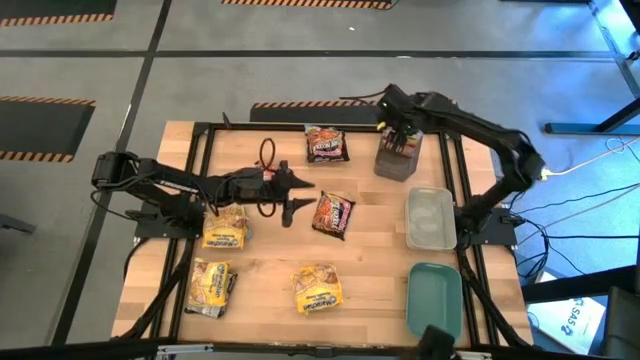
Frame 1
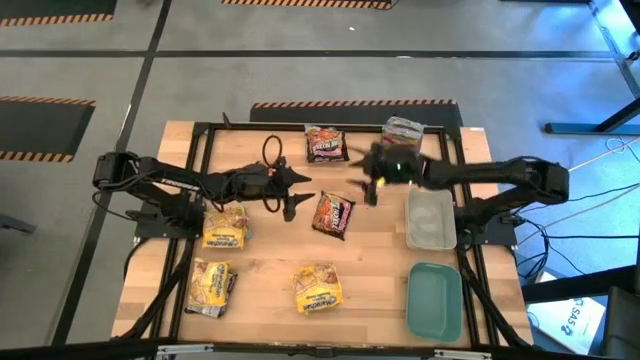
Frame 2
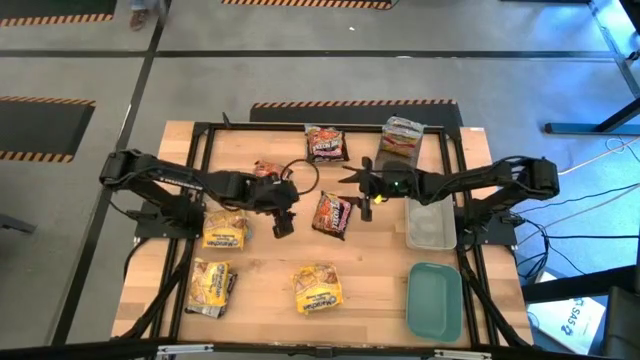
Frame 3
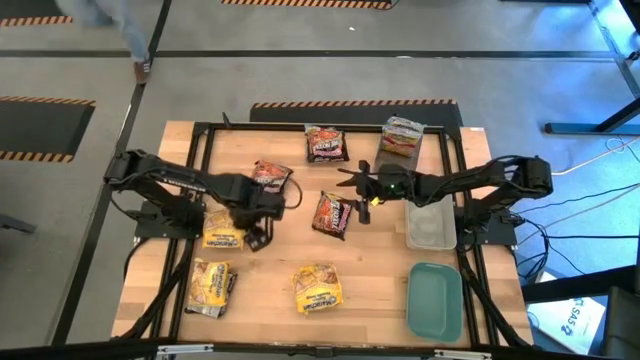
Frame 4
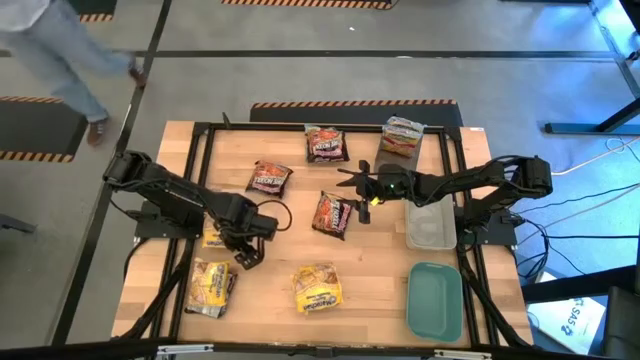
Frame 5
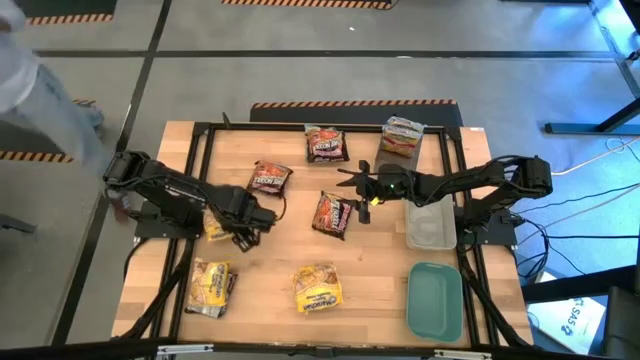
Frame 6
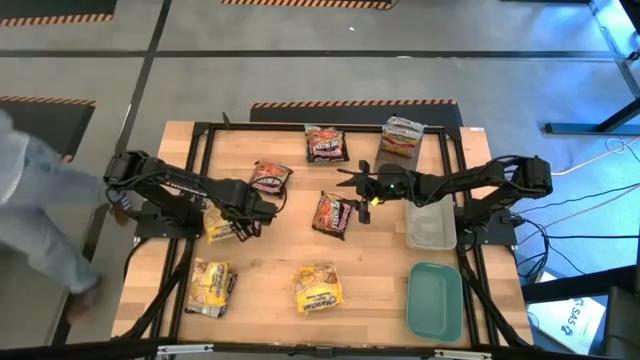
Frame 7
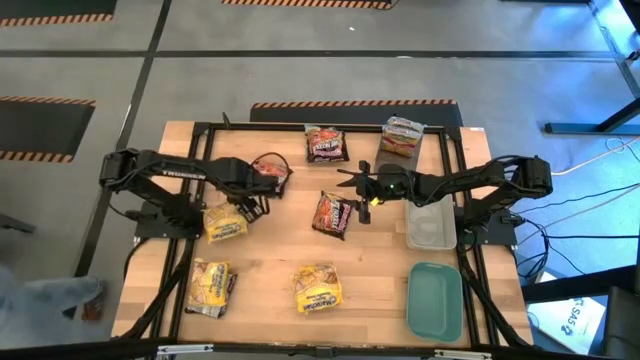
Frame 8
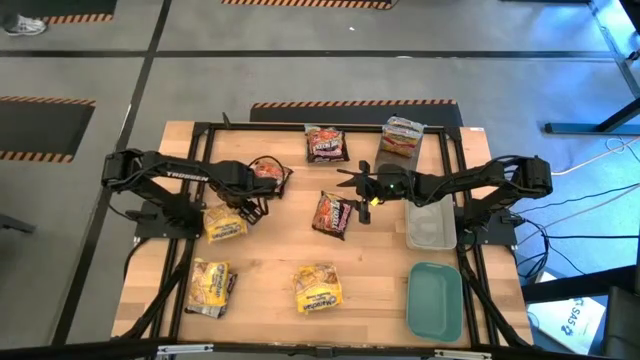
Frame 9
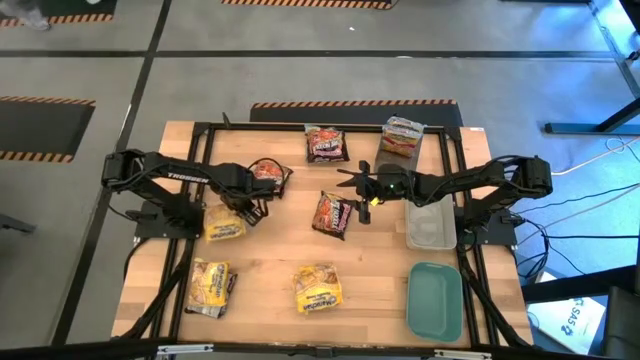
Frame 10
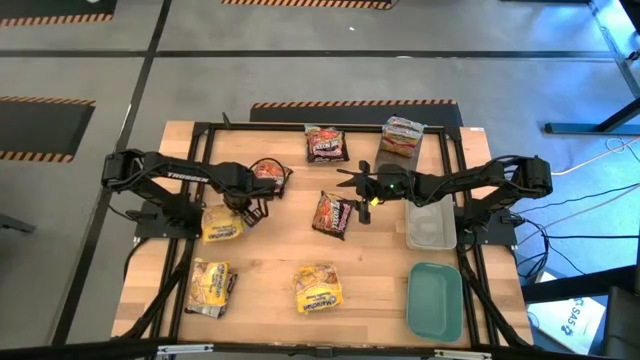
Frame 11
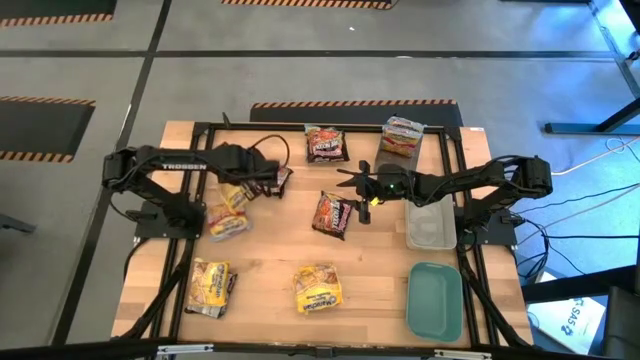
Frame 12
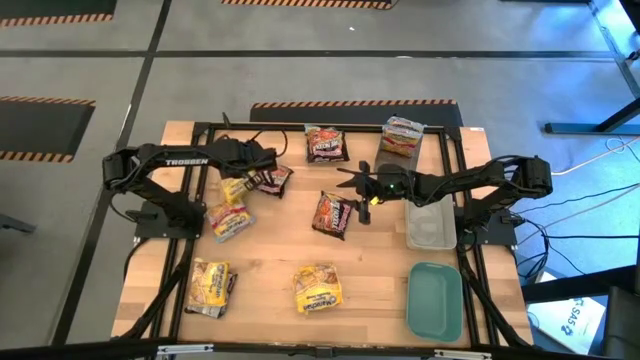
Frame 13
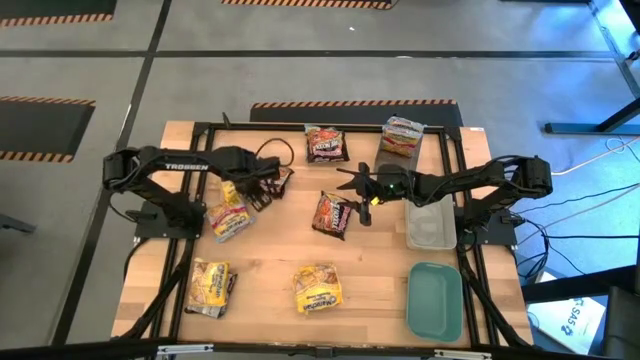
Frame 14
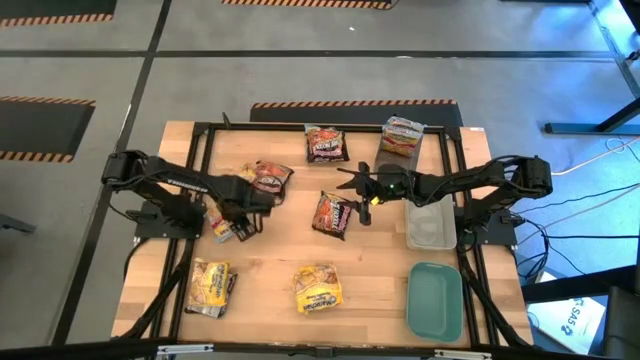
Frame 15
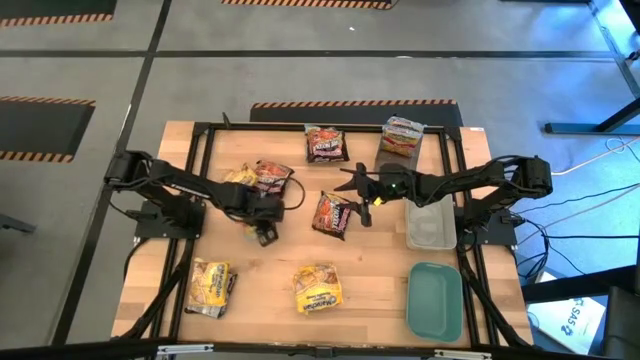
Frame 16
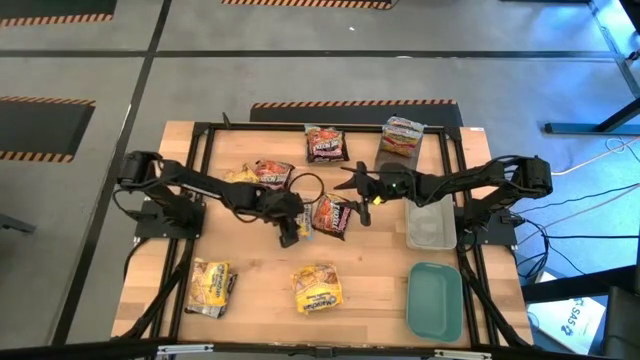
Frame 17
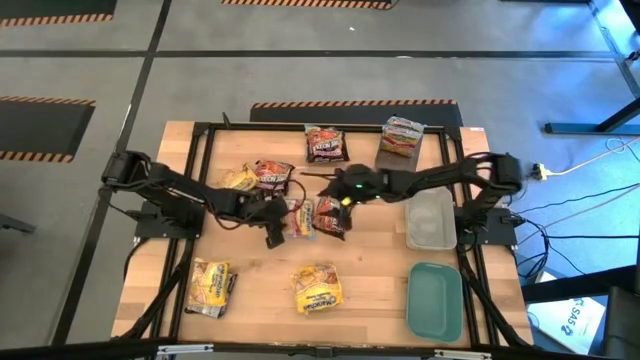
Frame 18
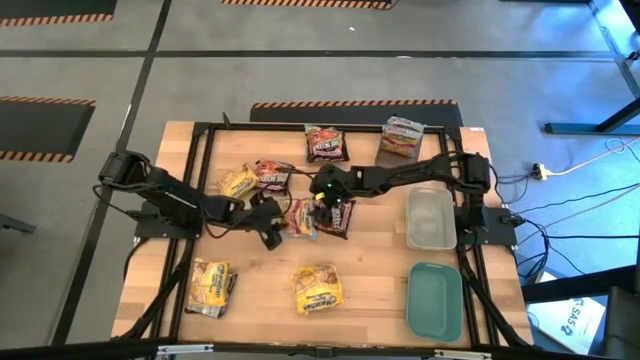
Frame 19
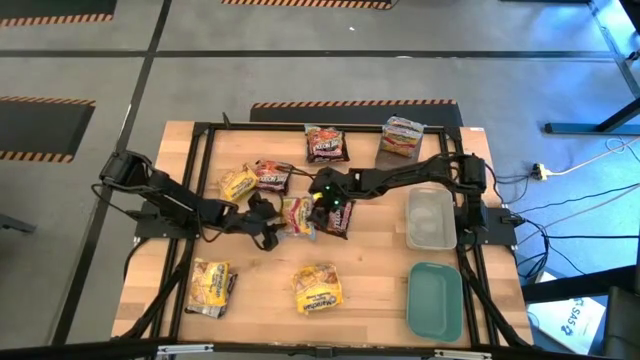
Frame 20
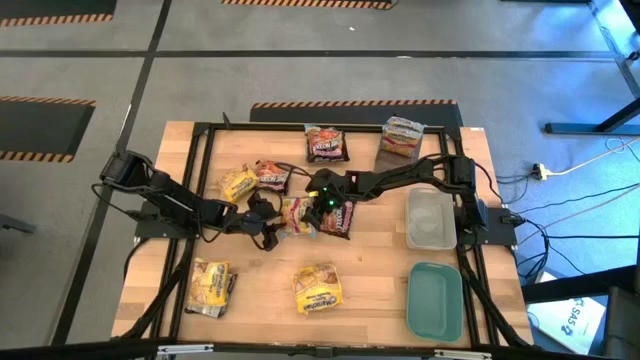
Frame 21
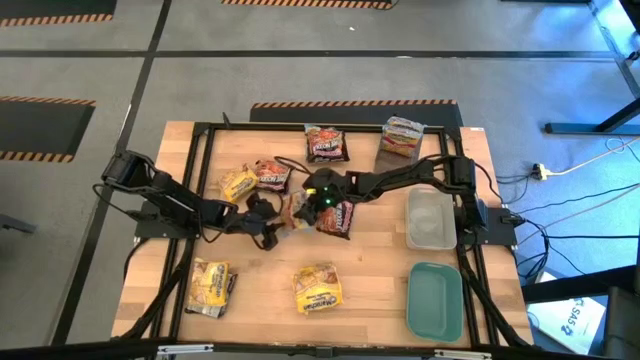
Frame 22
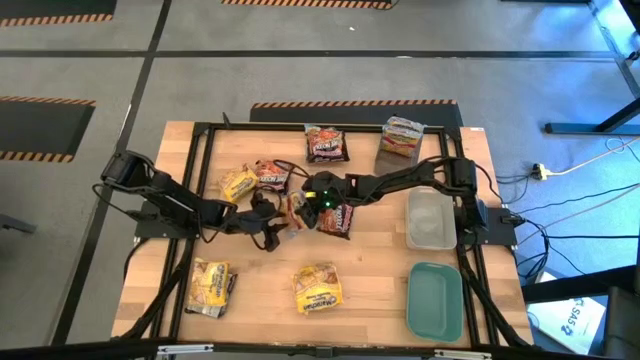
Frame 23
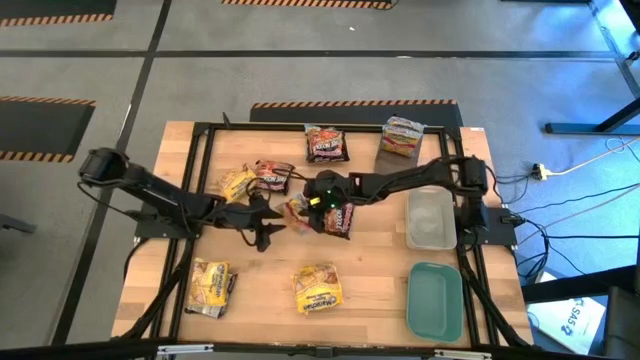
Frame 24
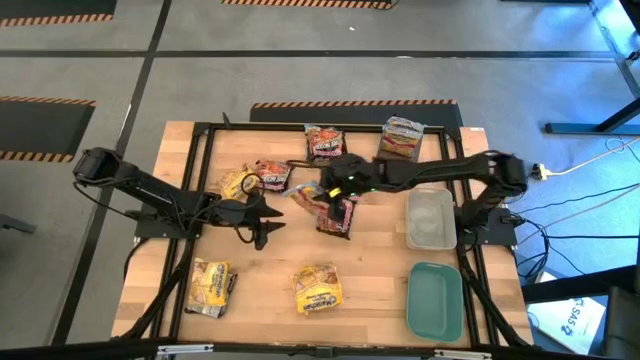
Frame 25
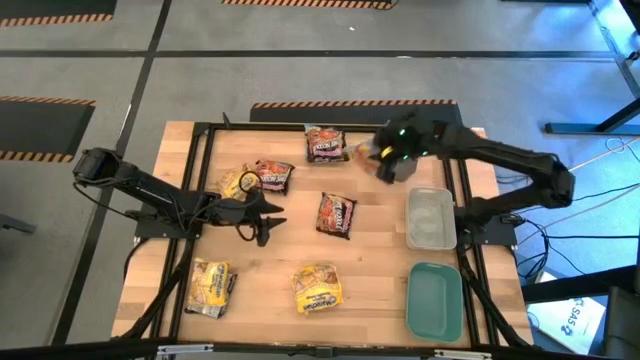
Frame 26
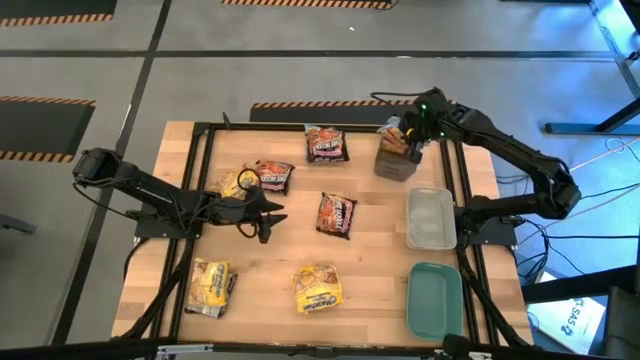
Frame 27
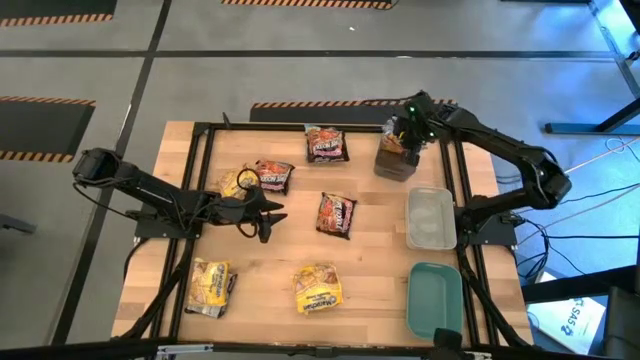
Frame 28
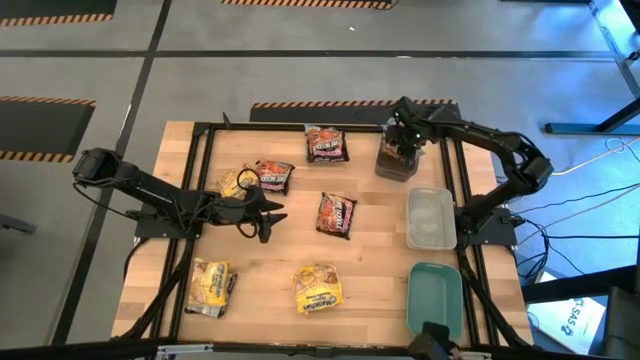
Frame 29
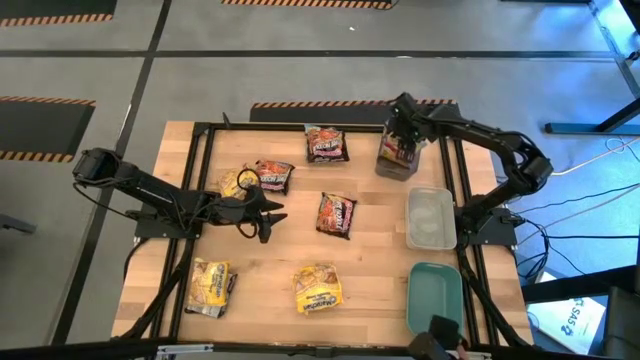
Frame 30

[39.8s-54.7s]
Task: Sort Maruchan noodles
Put the blue noodle pack into the black bin

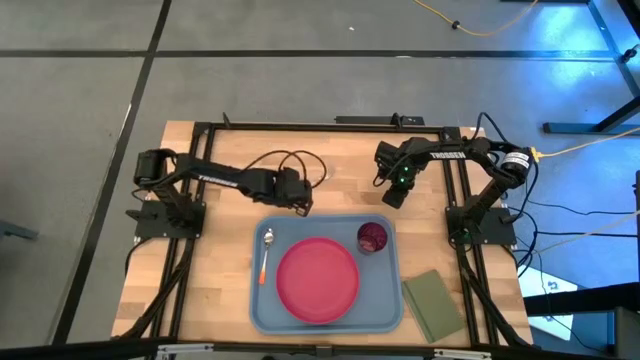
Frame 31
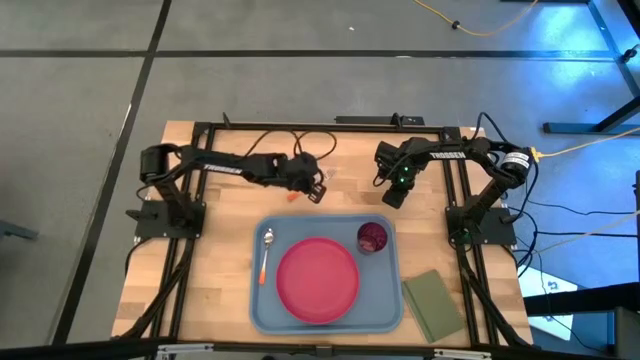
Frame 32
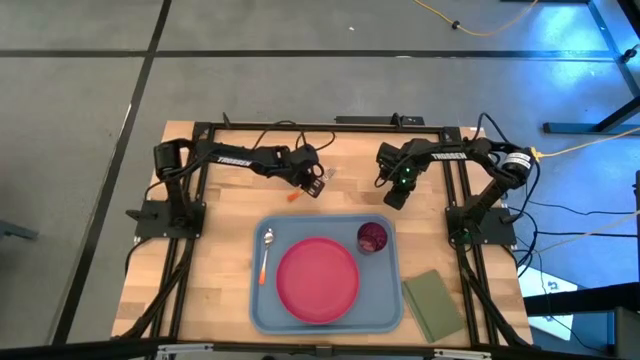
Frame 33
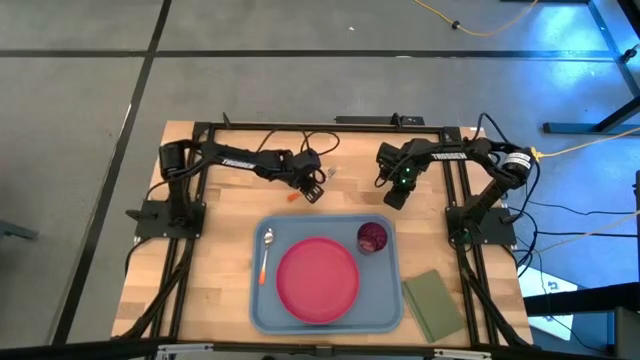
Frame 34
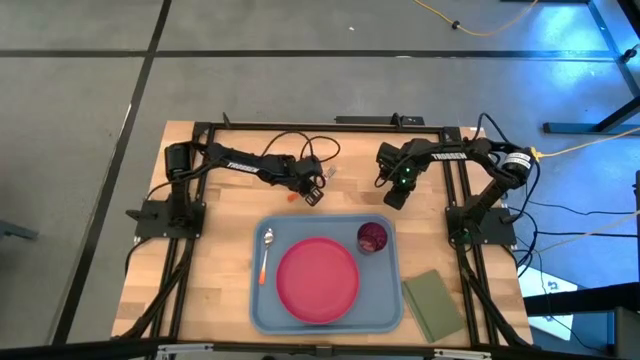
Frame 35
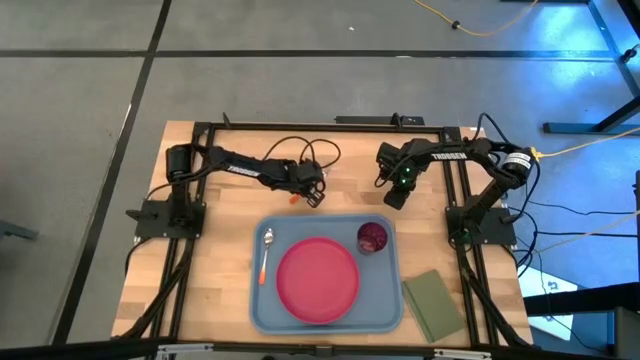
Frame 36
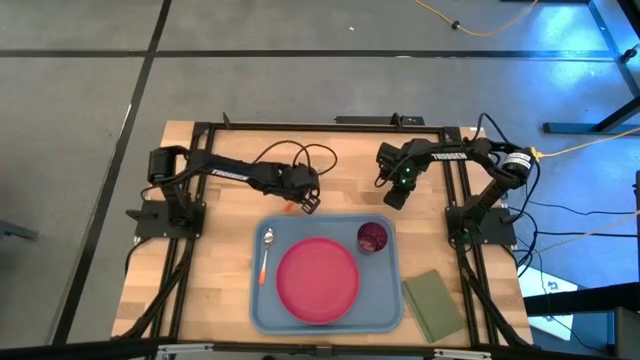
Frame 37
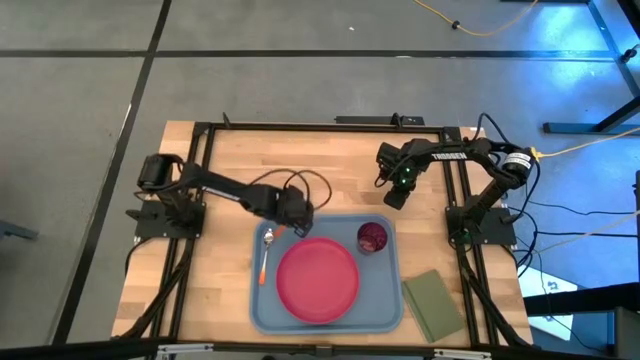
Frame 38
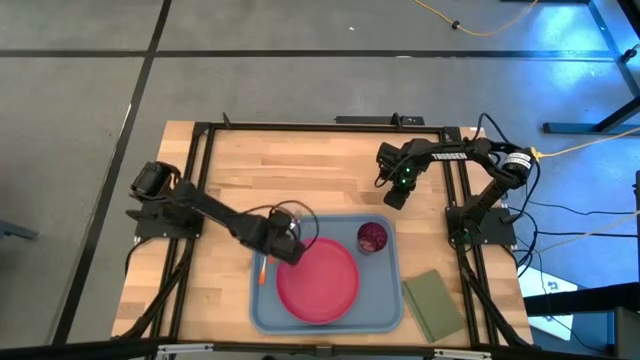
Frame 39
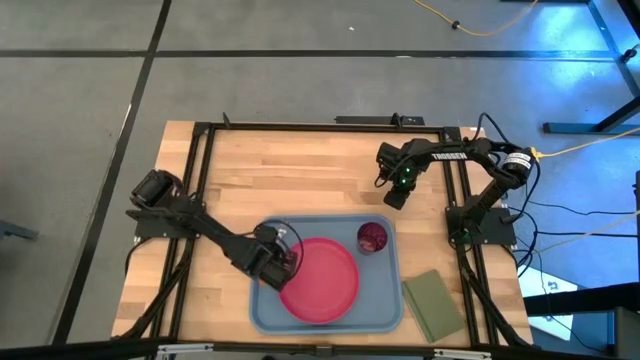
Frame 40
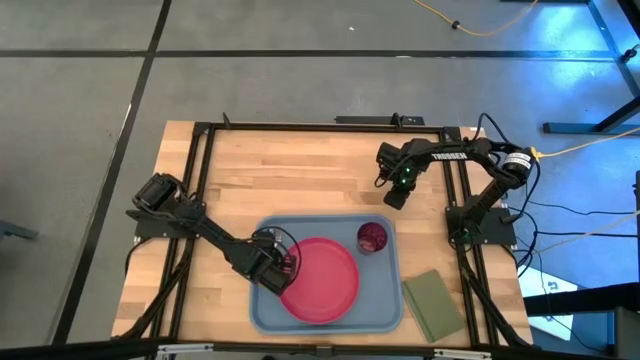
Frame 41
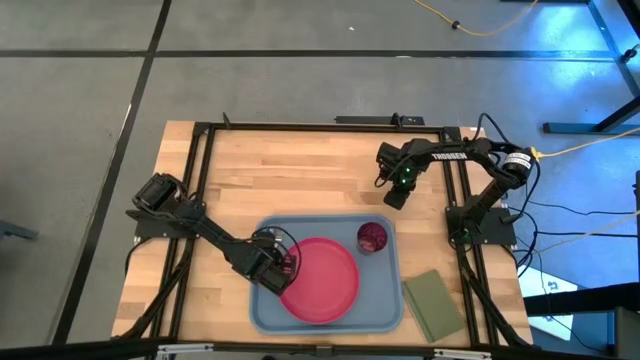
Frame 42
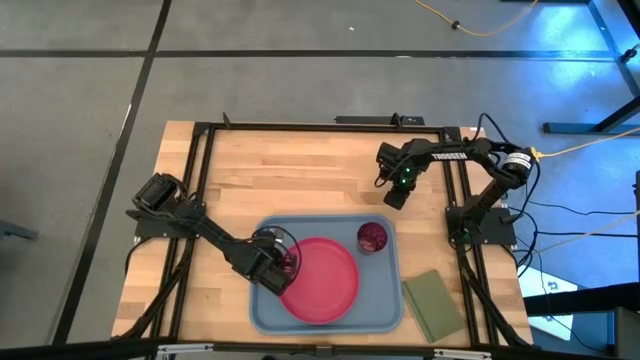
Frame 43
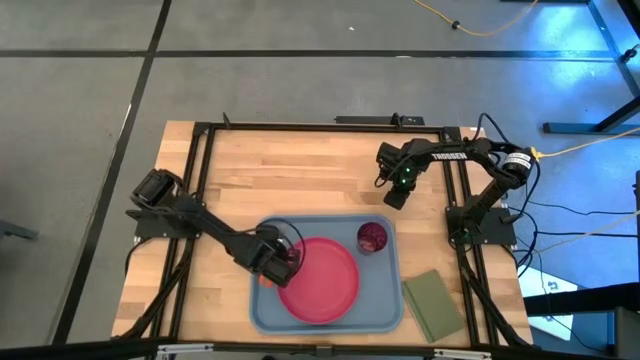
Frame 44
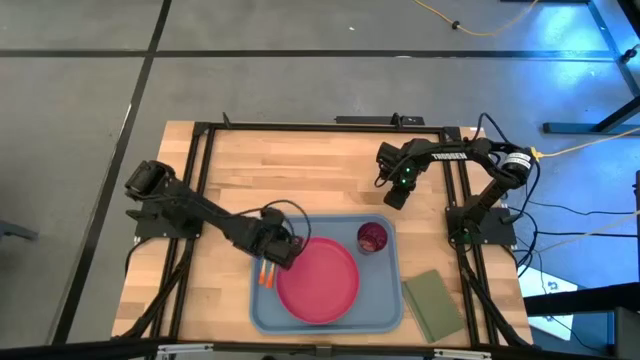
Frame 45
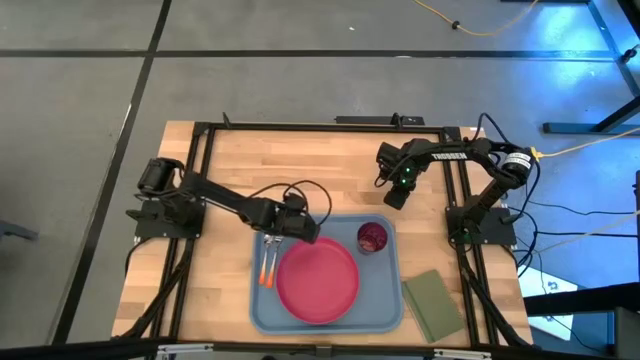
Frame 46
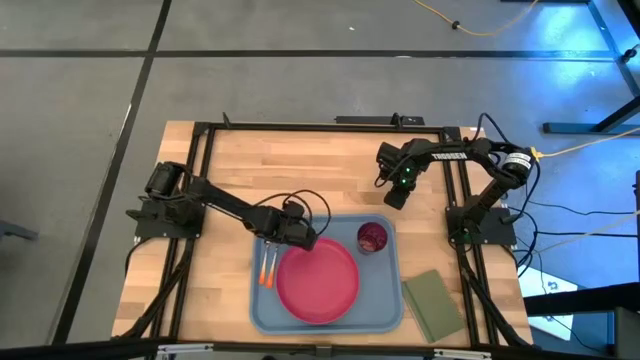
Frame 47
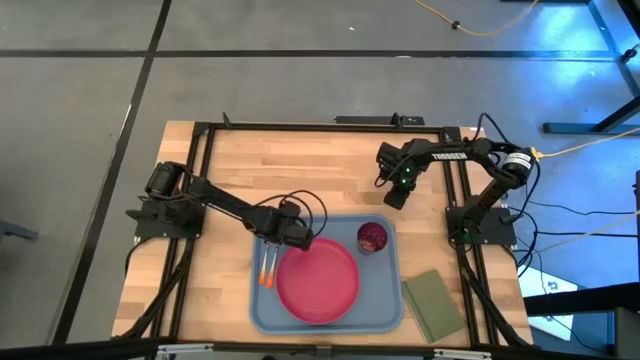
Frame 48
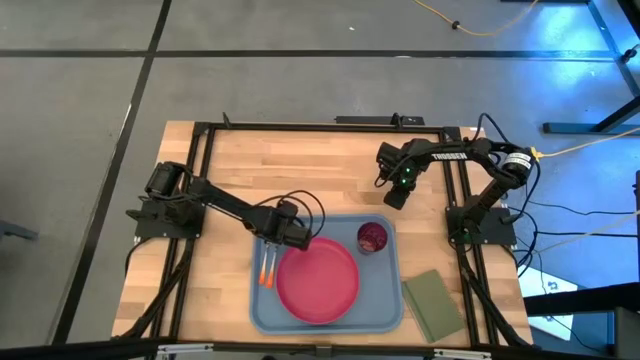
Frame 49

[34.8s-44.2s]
Task: Pick and place plate/cup/fork/spoon on tray
Put the orange white fork on the blue tray to the right side of the orange white spoon
